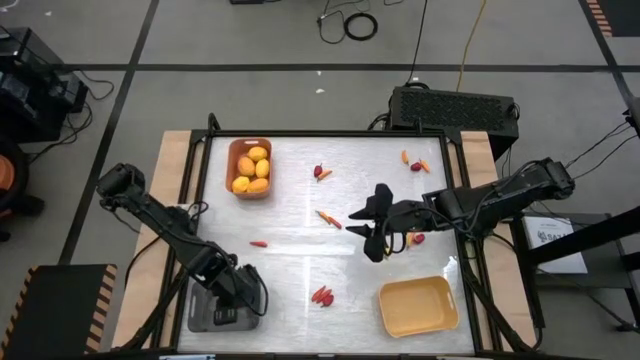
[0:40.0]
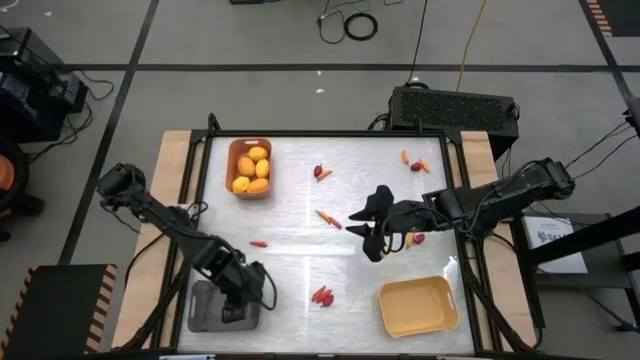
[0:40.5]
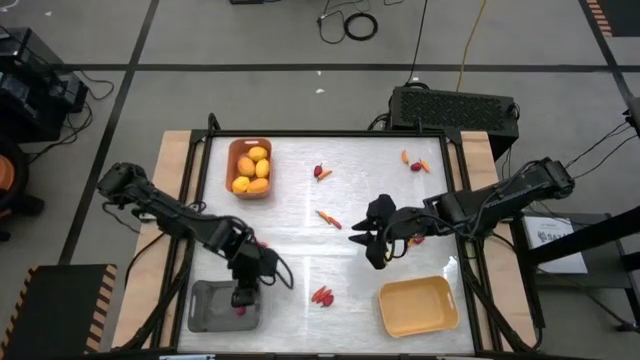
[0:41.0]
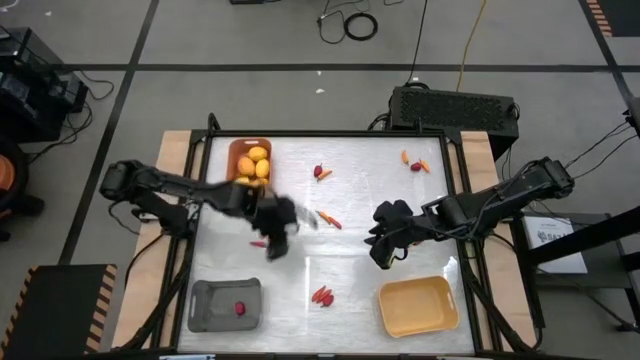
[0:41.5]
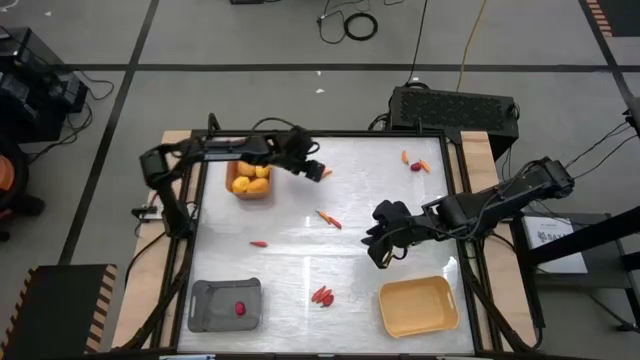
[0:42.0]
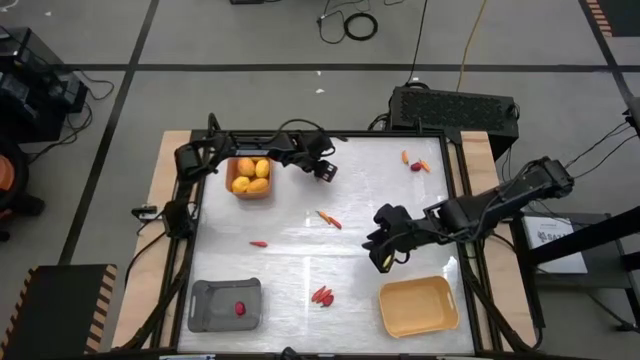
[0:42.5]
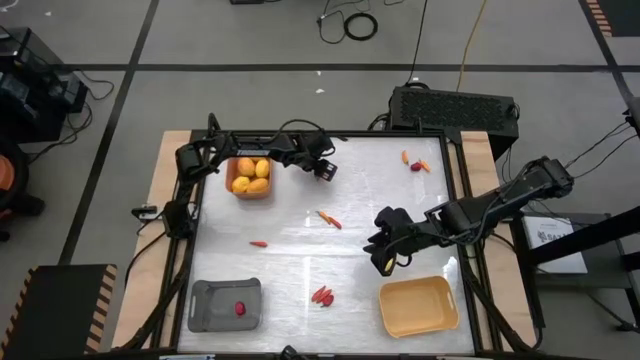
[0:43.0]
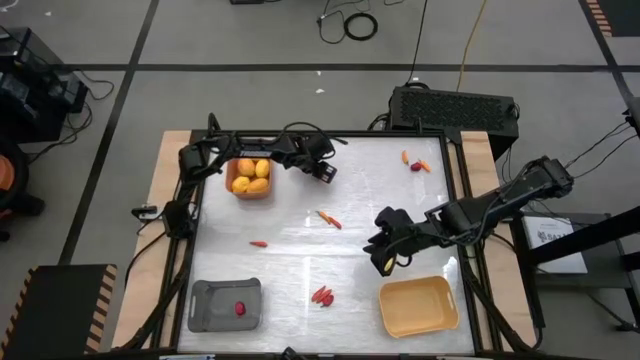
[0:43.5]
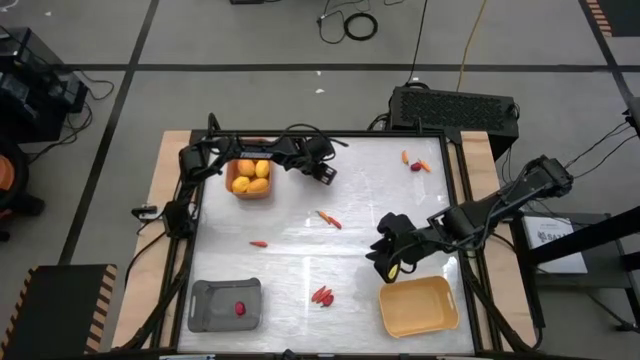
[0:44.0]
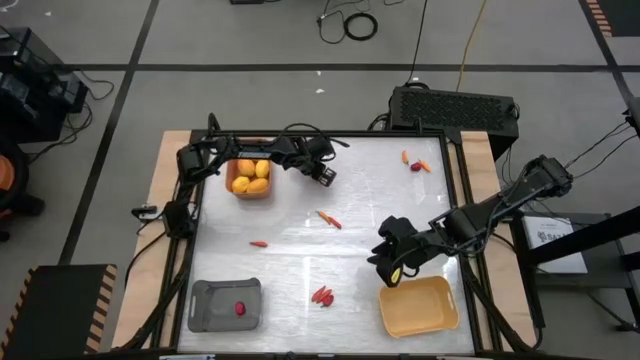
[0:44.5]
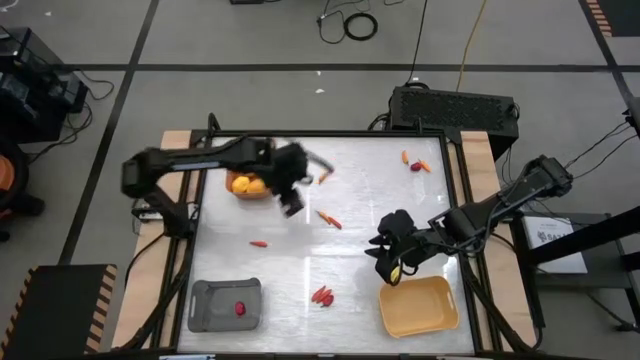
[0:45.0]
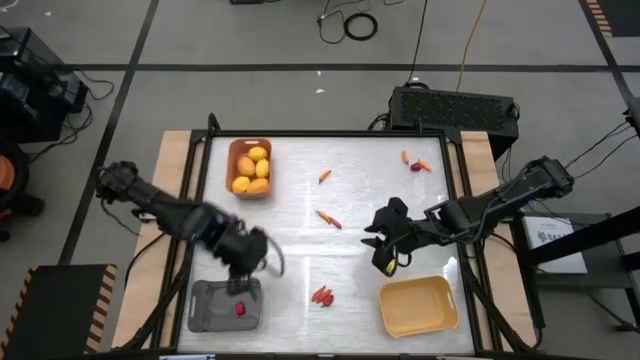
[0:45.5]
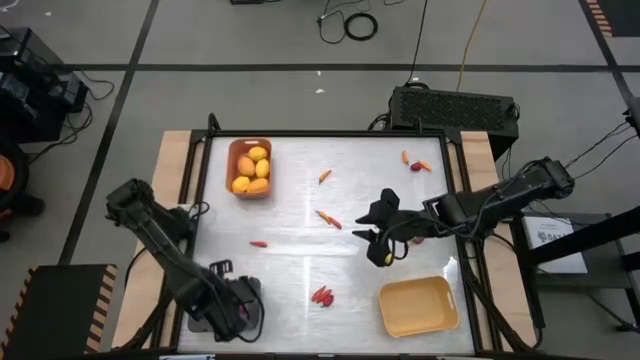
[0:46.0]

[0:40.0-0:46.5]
Task: Sort produce into baskets
Put the red bell pepper into the black bin

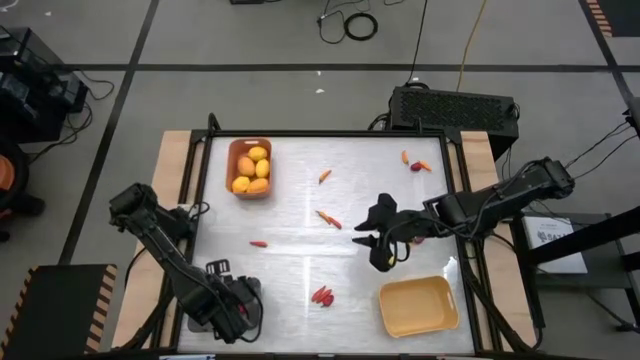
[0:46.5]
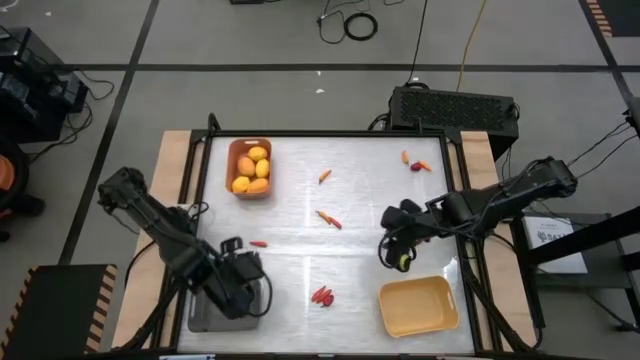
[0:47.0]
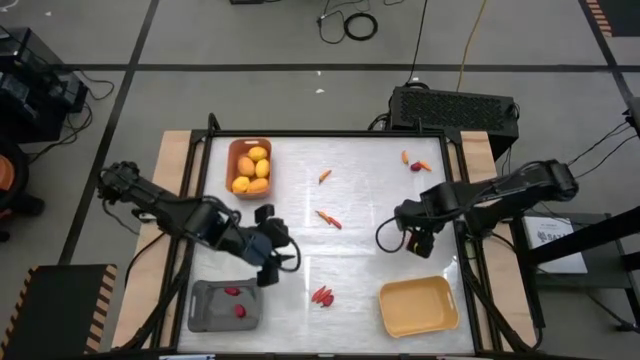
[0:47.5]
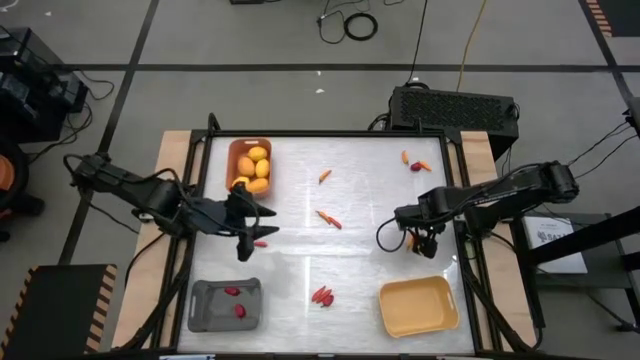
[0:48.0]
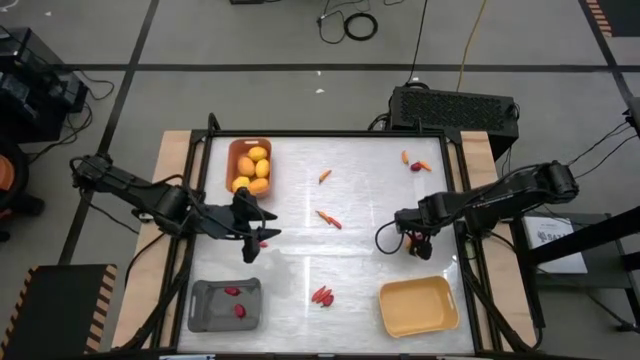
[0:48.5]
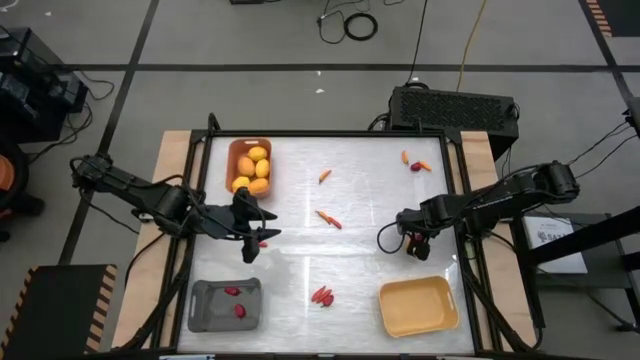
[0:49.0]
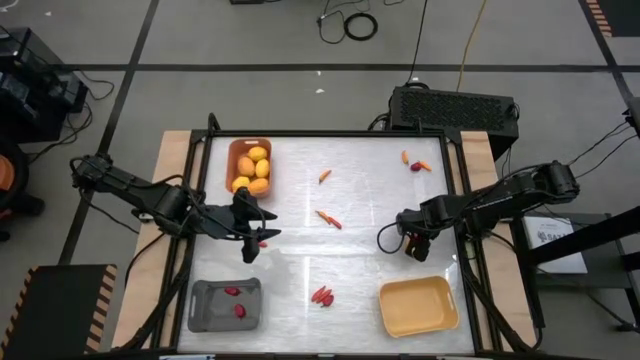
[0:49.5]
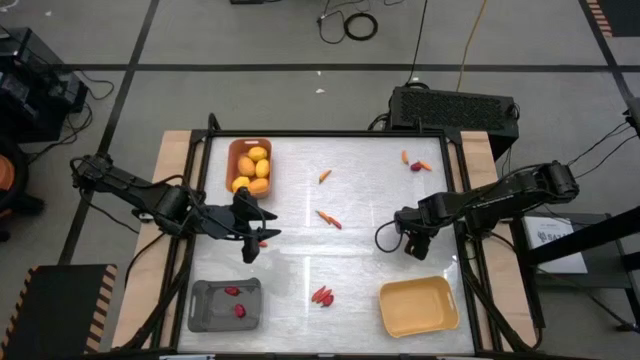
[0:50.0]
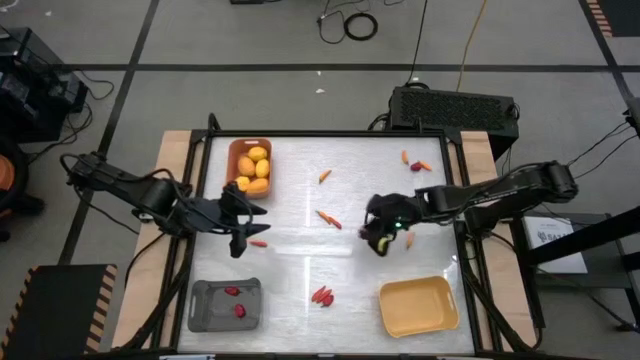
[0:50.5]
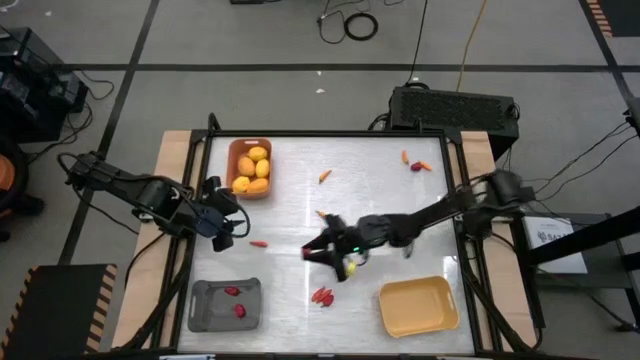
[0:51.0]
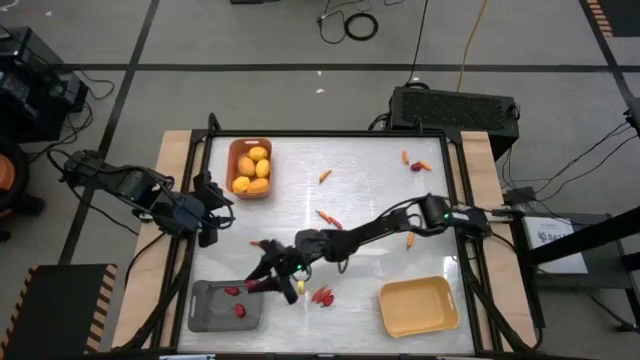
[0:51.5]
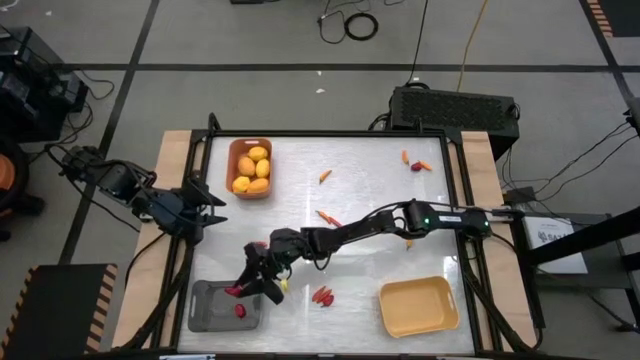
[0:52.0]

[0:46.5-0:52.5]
Put the red bell pepper into the black bin

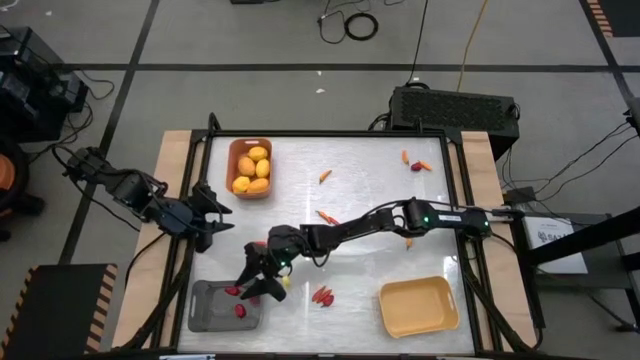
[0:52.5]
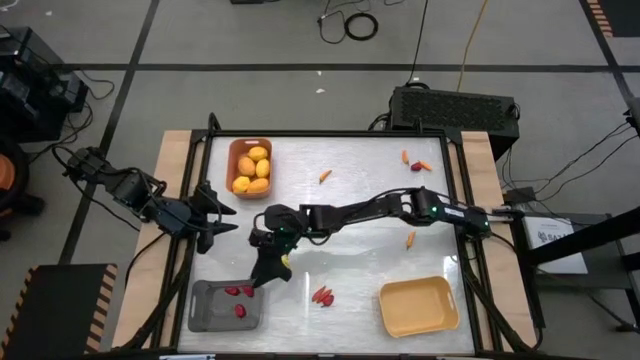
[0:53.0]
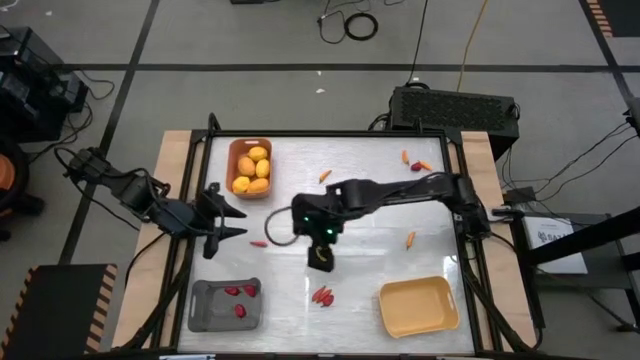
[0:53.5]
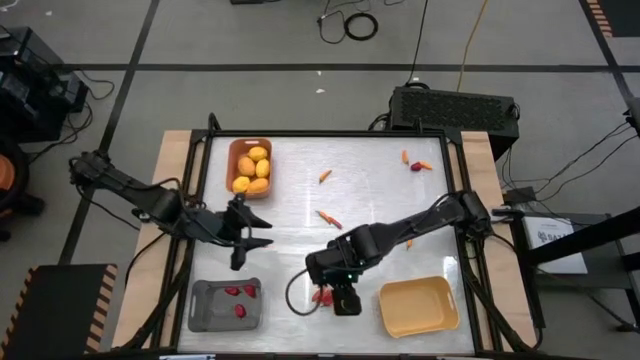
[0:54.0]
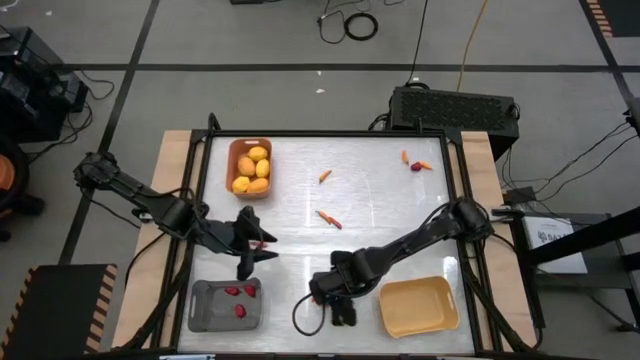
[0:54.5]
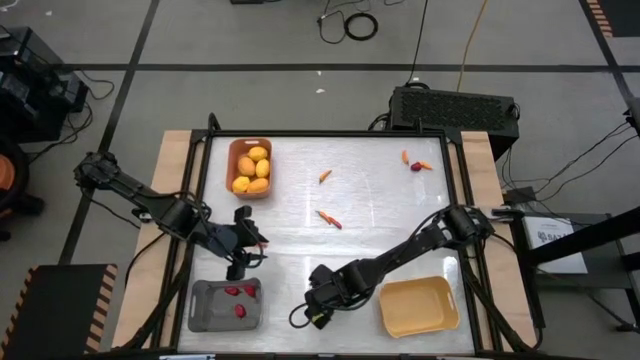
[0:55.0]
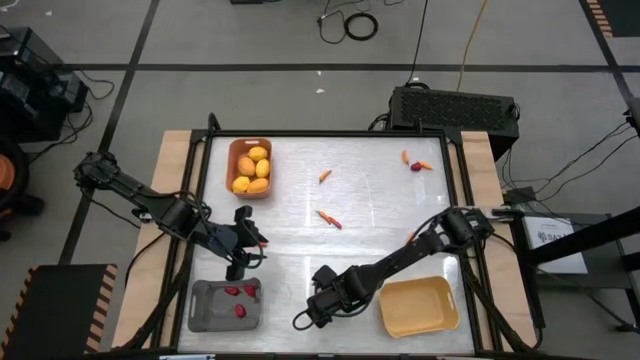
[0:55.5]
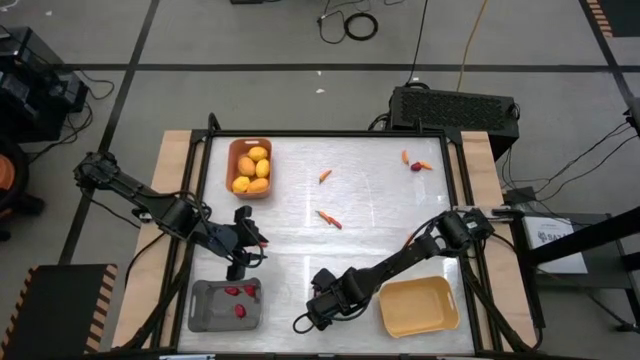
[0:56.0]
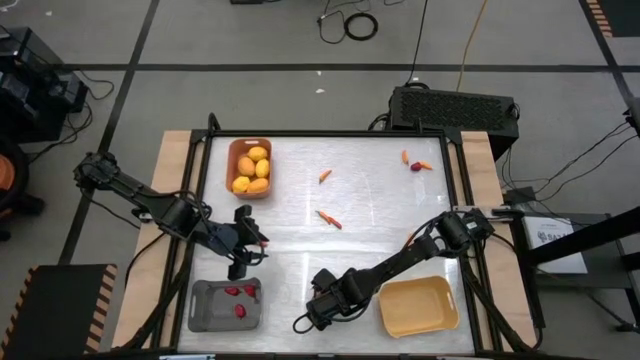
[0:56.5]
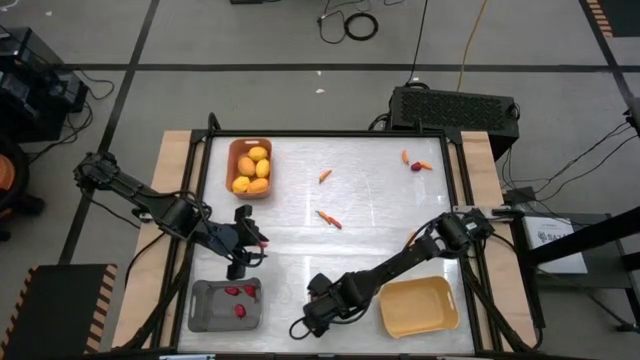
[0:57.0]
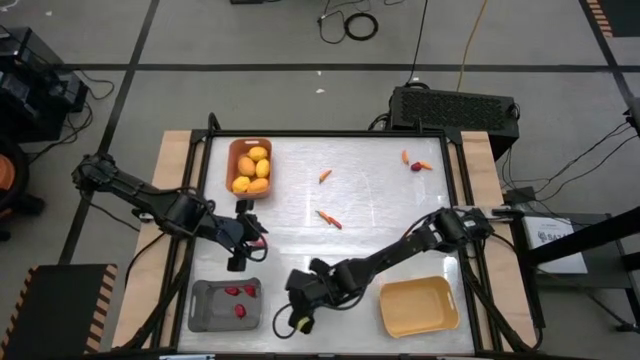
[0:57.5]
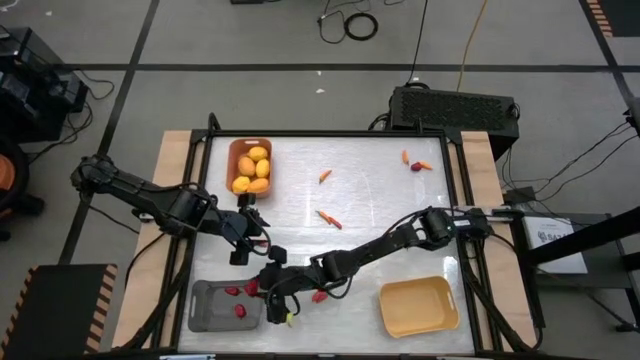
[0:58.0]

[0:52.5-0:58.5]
Put the red bell pepper into the black bin

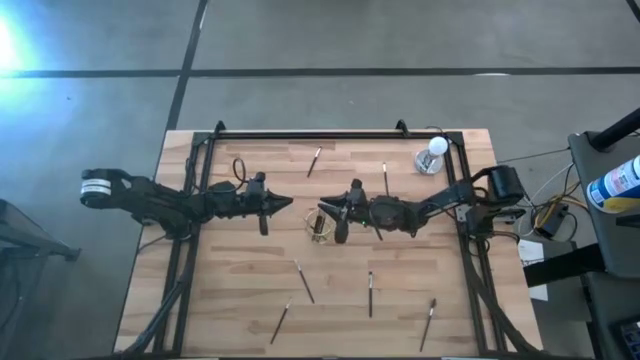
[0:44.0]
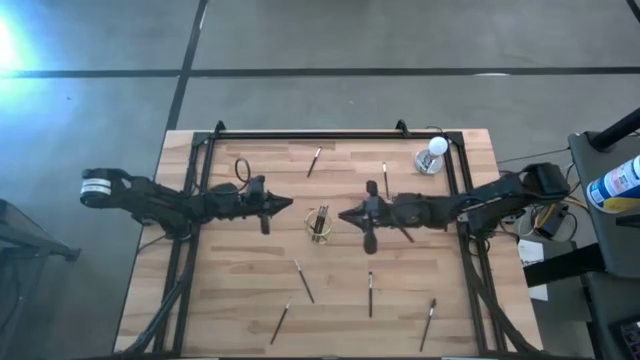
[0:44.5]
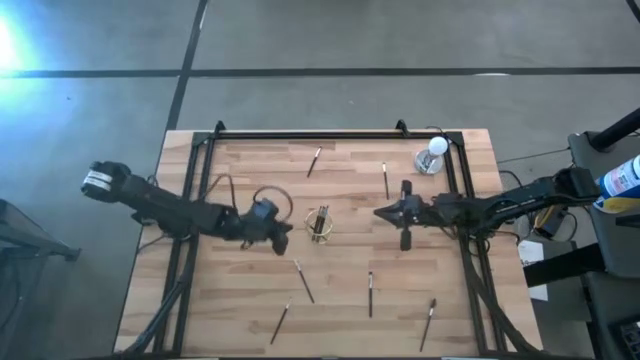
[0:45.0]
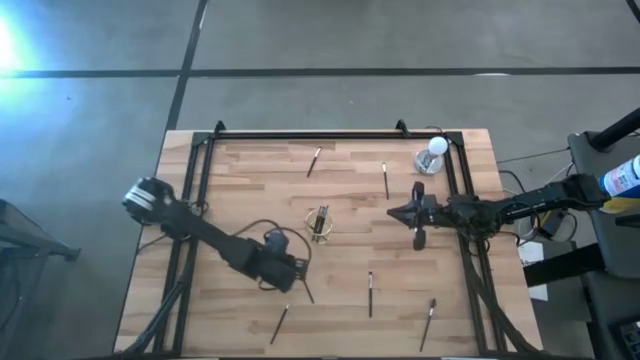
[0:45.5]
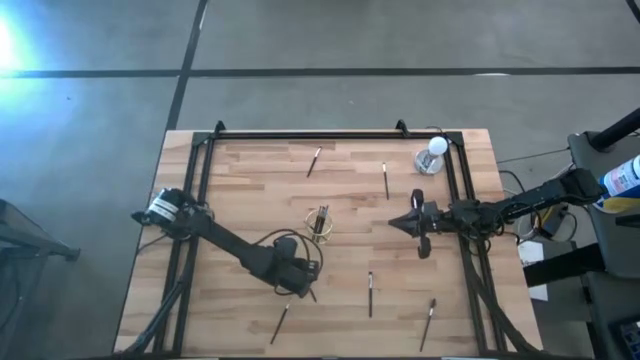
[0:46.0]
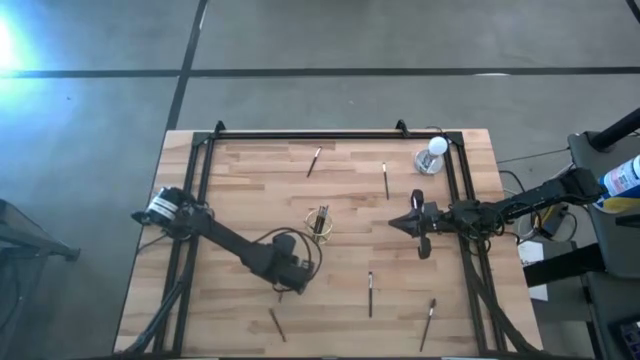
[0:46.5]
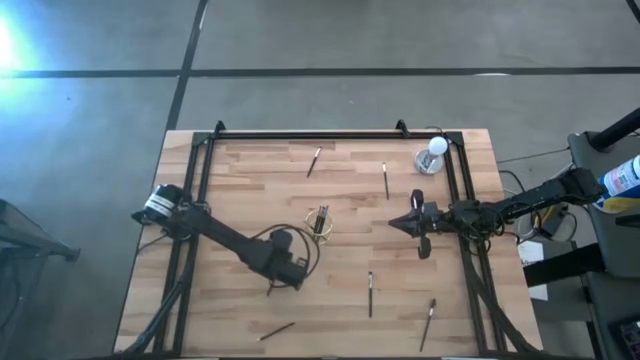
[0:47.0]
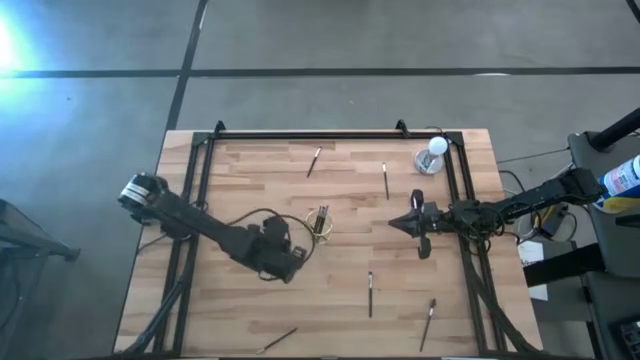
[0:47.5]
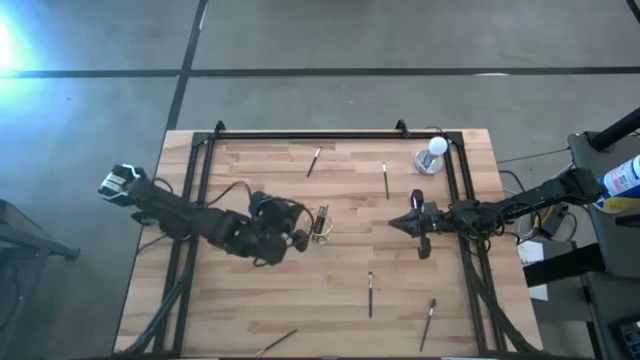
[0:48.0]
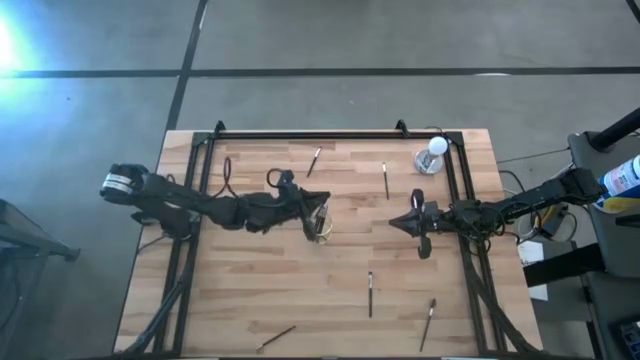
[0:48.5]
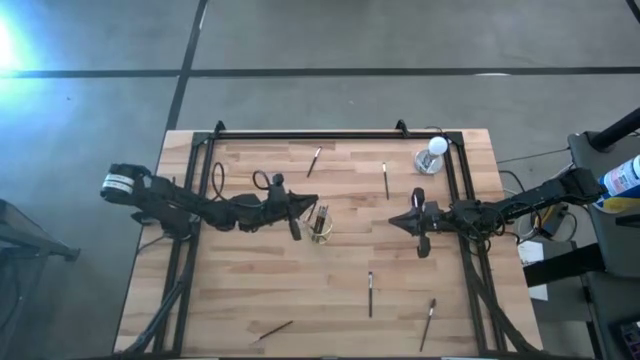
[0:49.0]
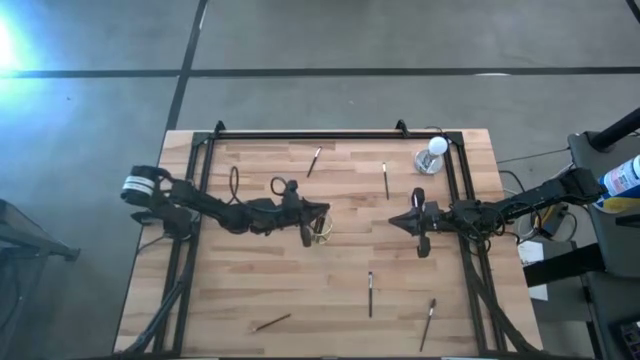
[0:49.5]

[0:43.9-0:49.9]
Task: Pick & Place Makeup Brushes
Put the eyeshadow brush into the gold makeup brush holder
